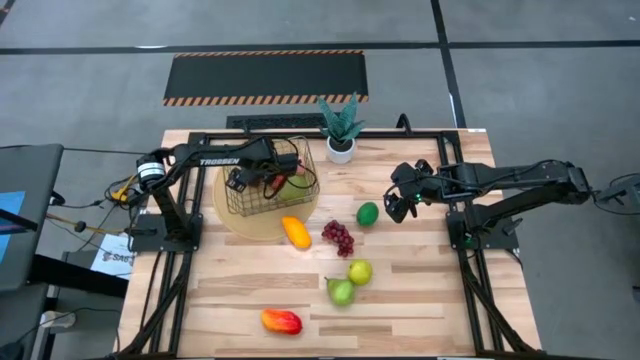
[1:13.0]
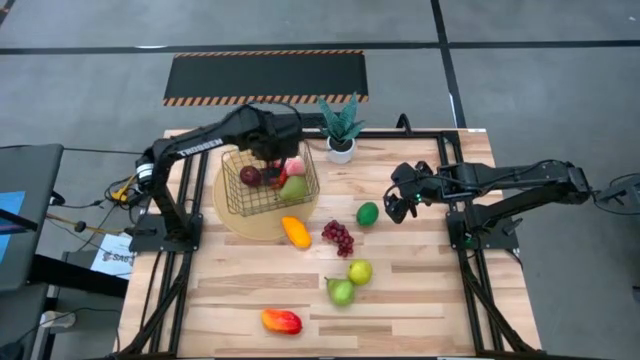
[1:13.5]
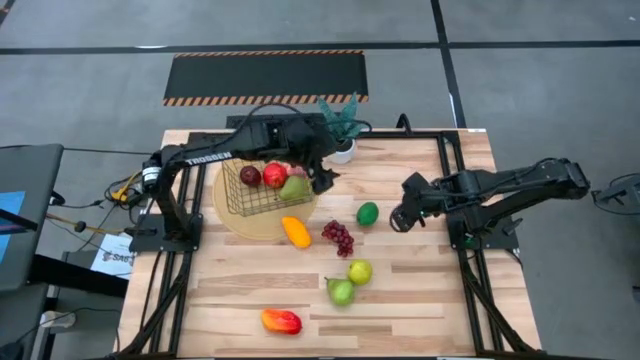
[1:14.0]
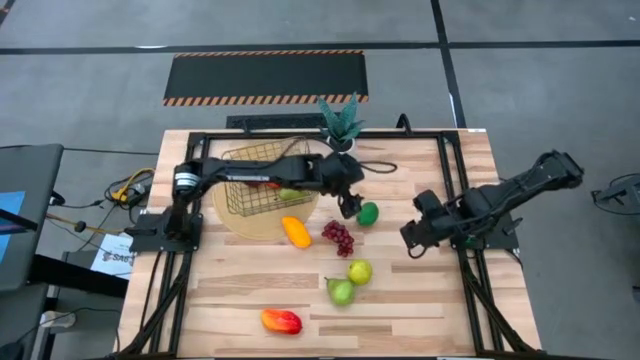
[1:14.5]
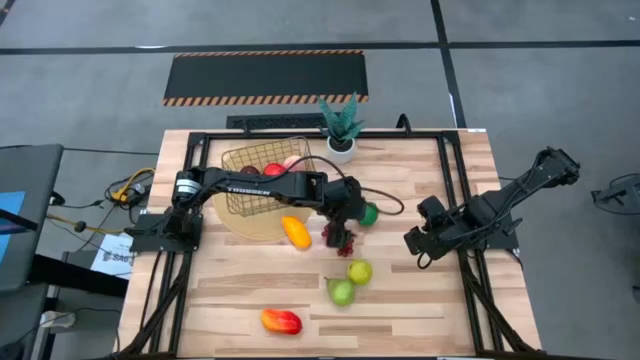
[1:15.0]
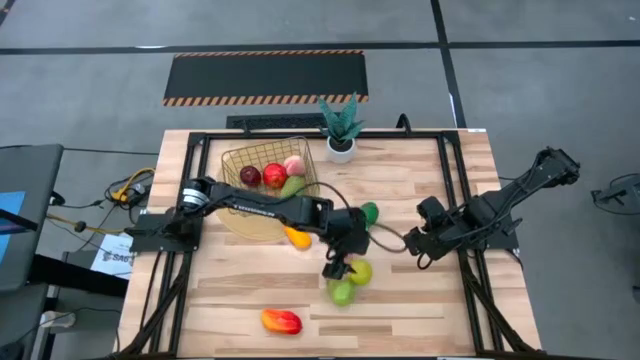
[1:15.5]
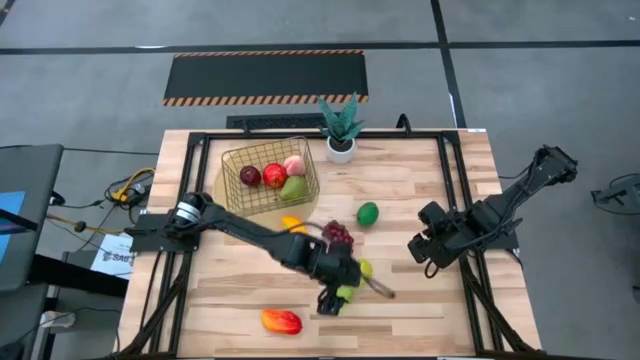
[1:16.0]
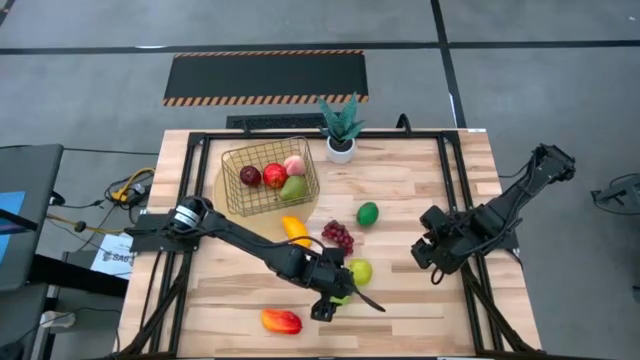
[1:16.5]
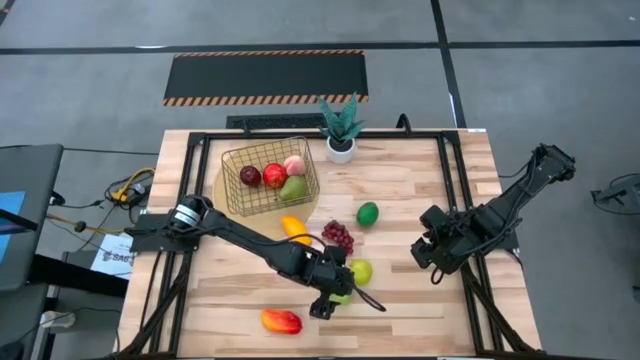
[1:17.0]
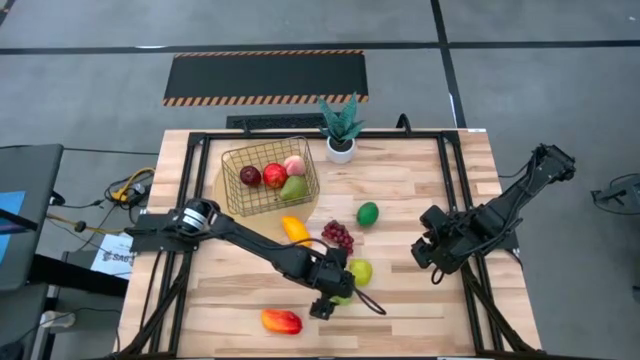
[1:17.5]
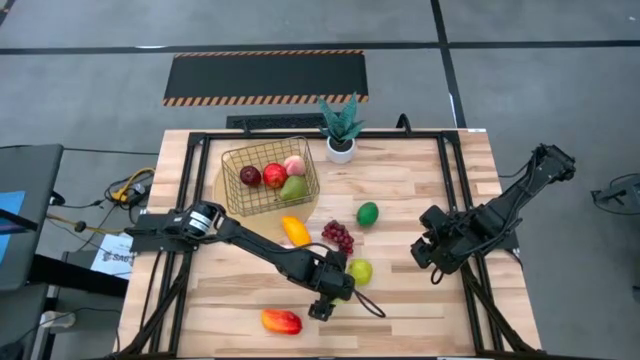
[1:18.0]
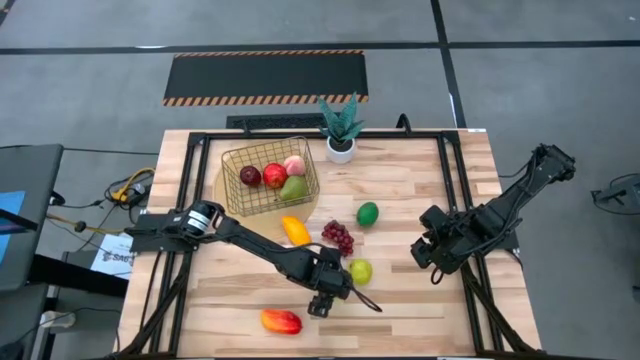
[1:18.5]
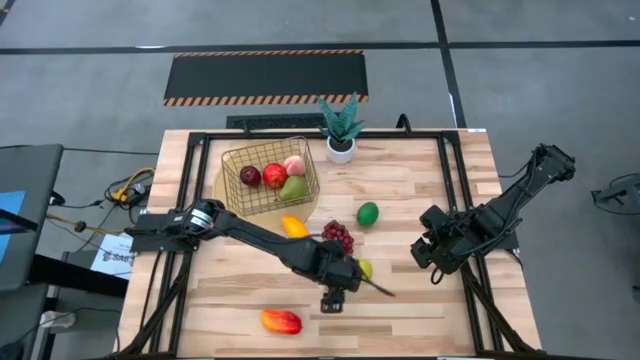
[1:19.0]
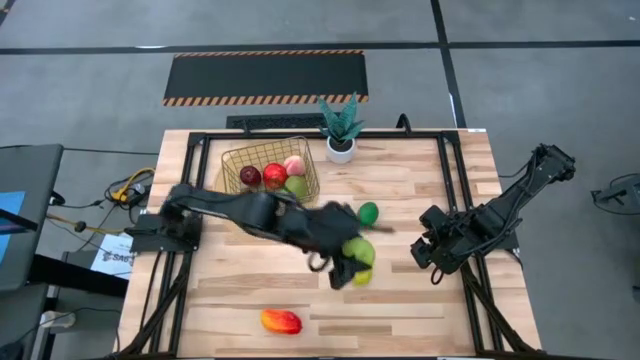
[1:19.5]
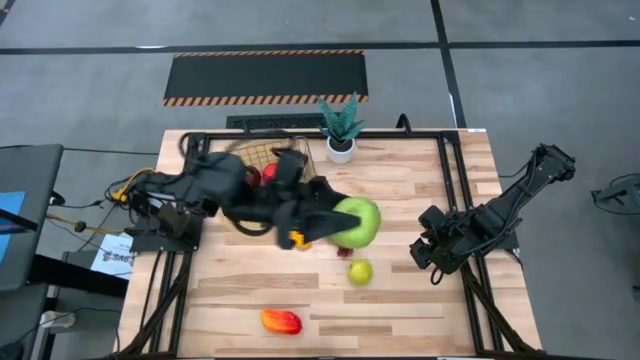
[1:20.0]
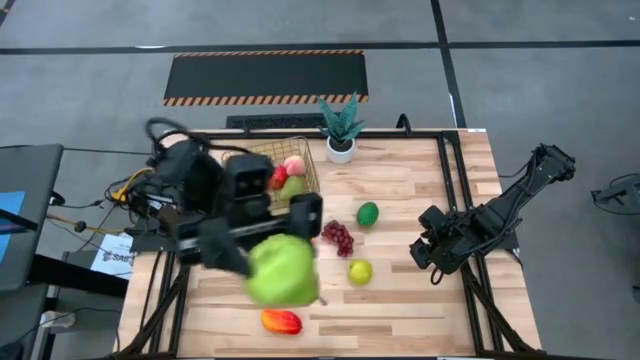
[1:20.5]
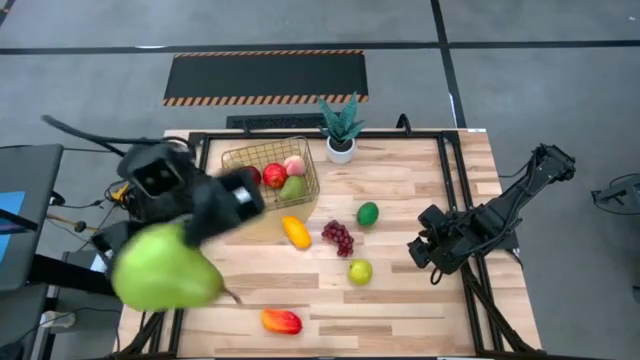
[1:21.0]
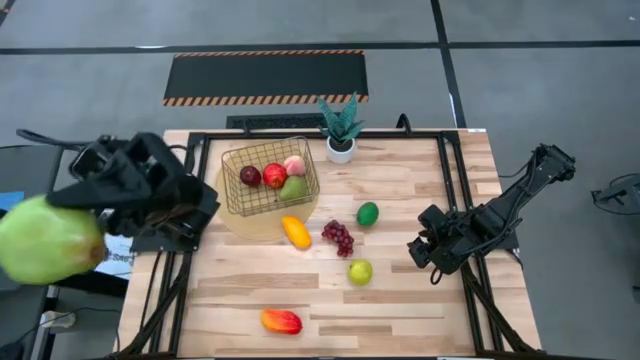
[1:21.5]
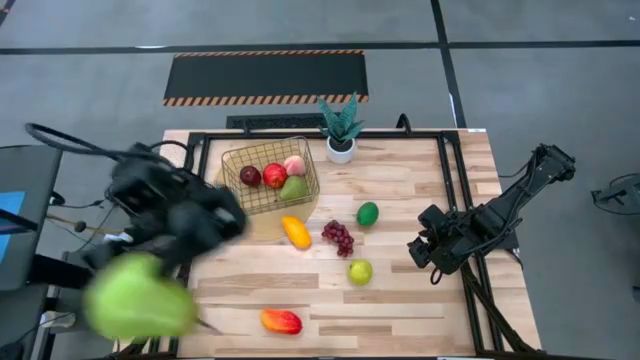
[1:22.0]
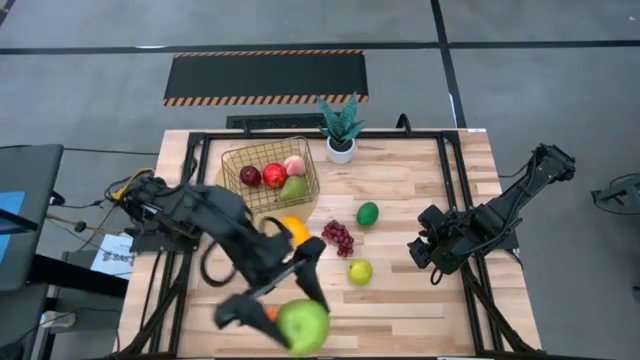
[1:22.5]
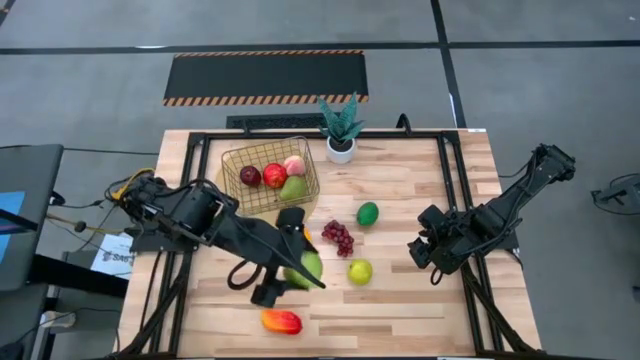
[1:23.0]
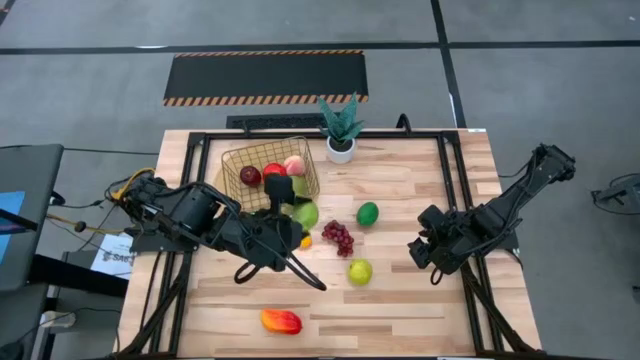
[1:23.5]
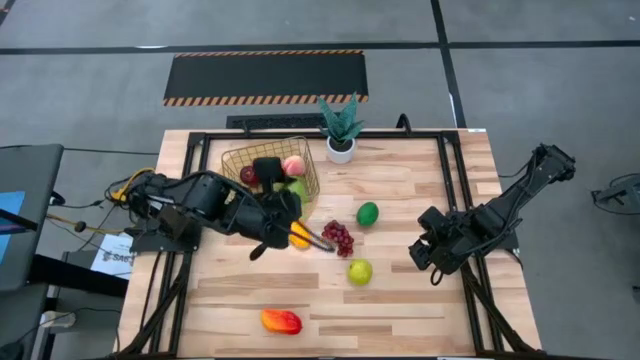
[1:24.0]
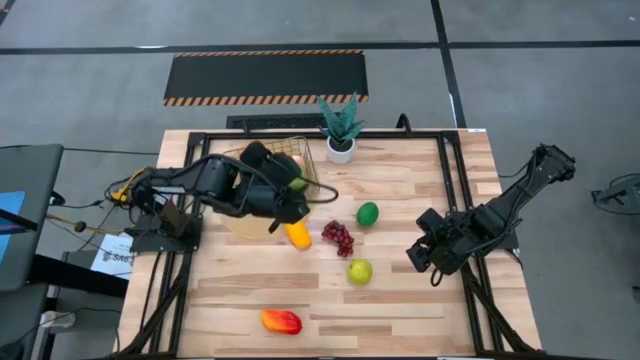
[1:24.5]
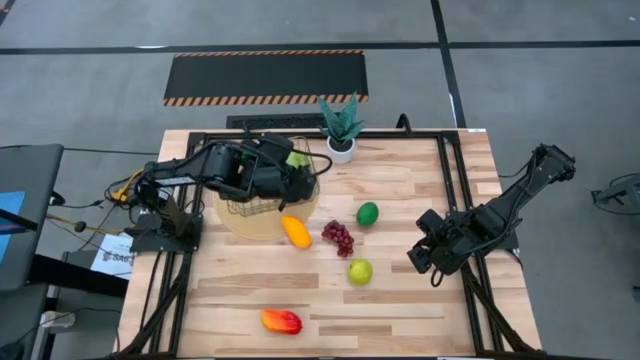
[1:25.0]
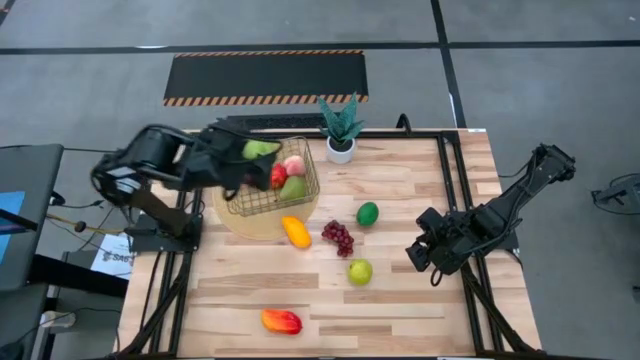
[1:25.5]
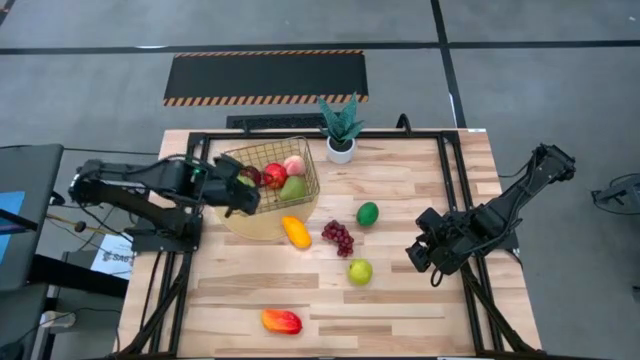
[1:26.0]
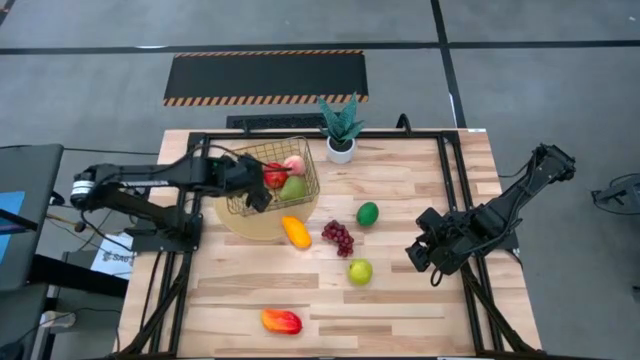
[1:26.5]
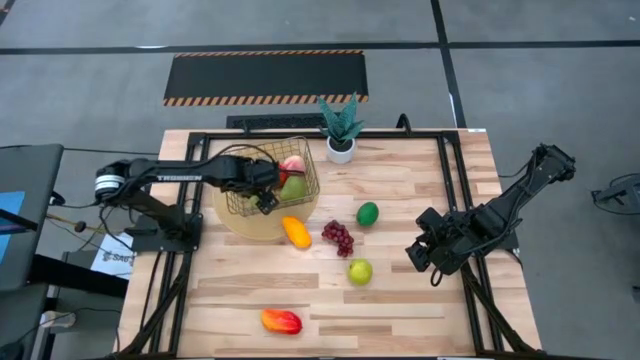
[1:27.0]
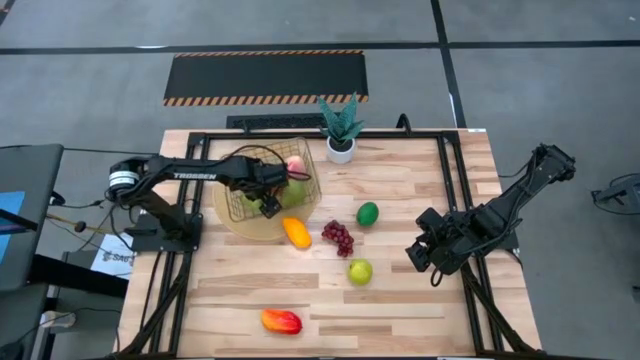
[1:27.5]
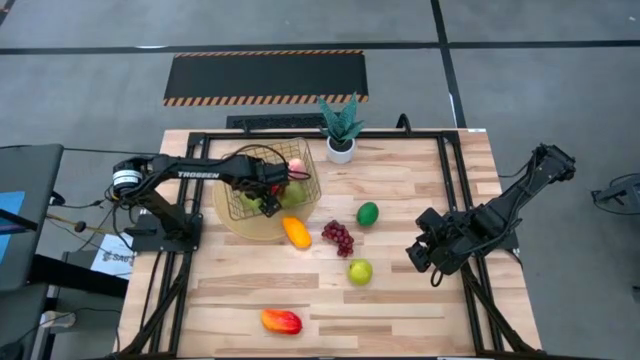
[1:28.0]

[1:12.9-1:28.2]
Task: Build produce basket
Put the green pear into the wire basket
